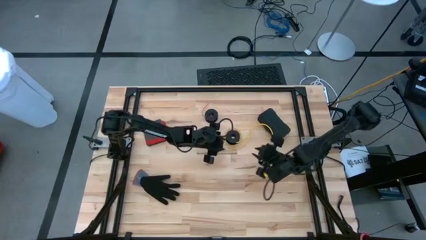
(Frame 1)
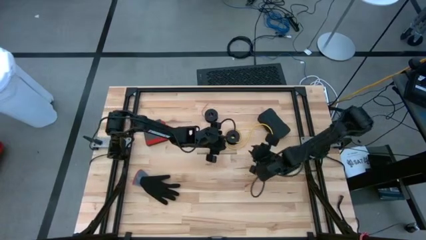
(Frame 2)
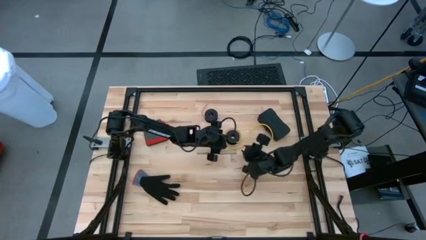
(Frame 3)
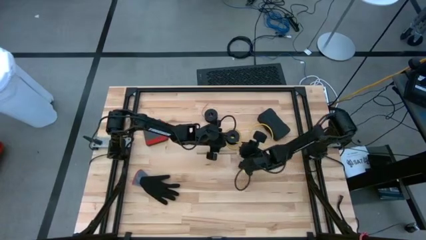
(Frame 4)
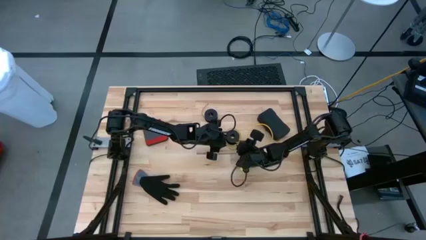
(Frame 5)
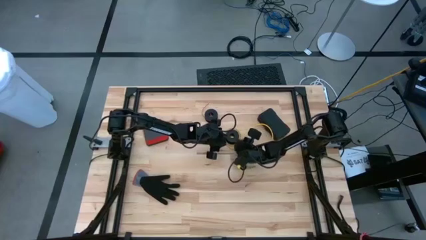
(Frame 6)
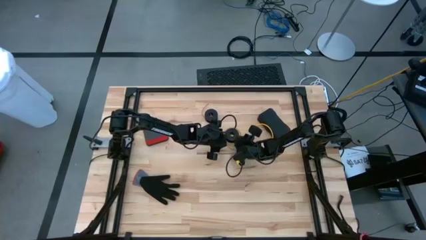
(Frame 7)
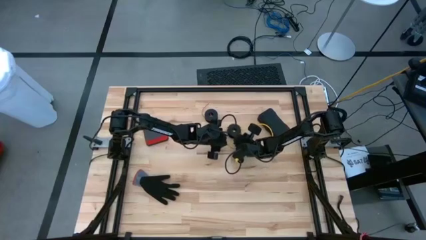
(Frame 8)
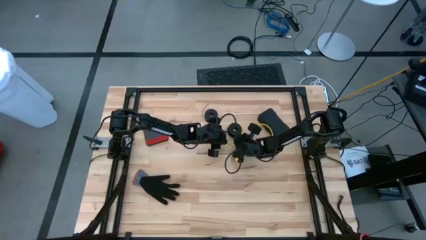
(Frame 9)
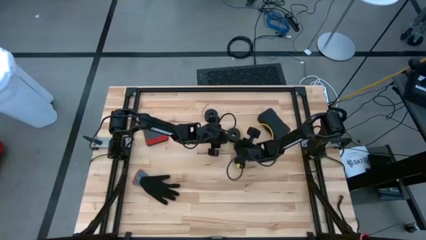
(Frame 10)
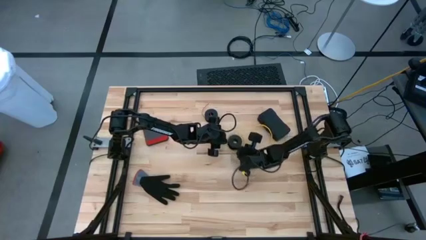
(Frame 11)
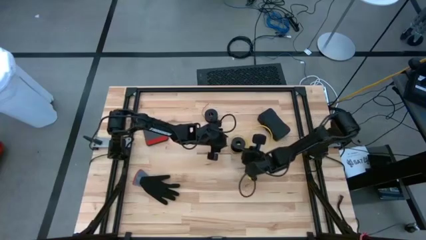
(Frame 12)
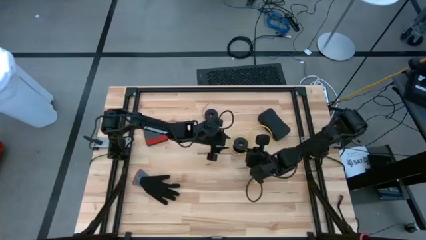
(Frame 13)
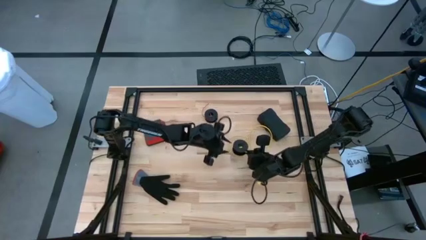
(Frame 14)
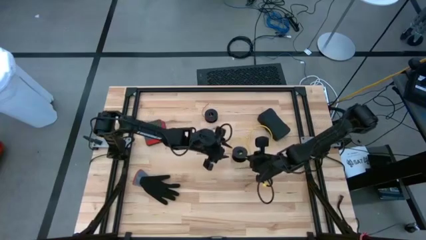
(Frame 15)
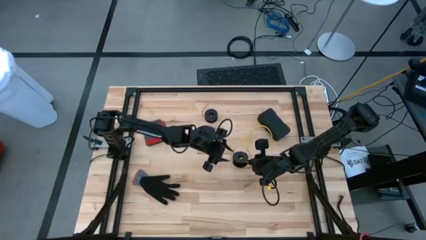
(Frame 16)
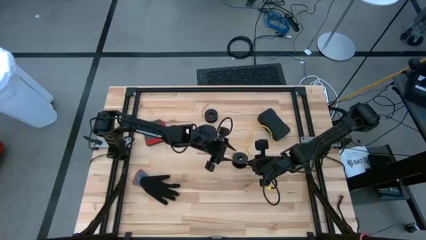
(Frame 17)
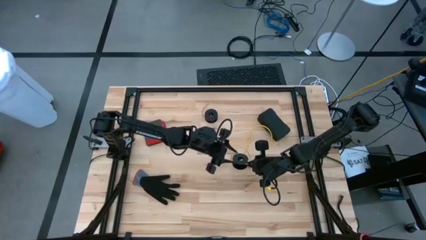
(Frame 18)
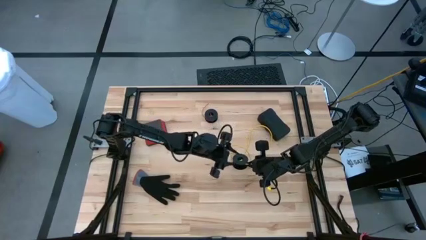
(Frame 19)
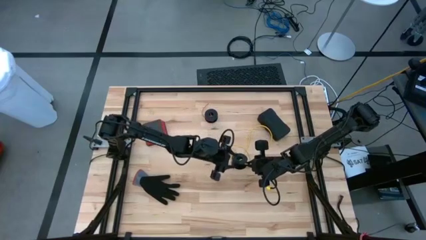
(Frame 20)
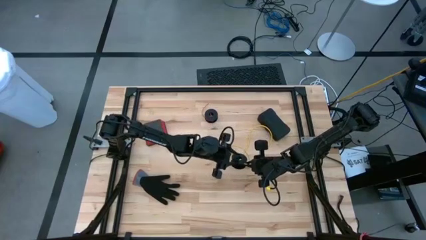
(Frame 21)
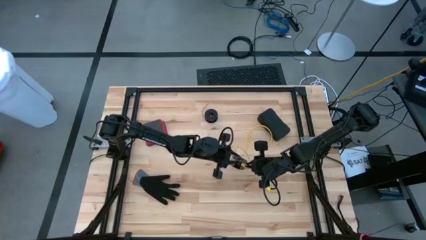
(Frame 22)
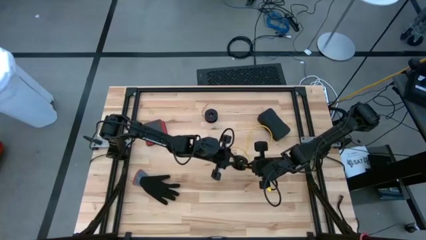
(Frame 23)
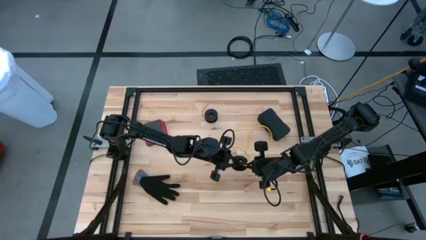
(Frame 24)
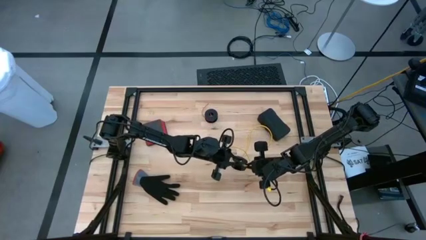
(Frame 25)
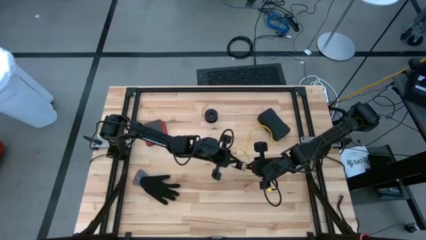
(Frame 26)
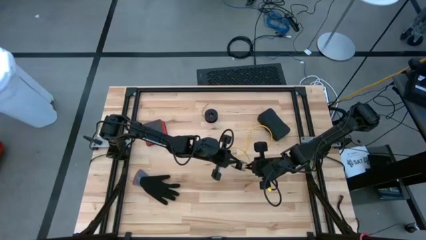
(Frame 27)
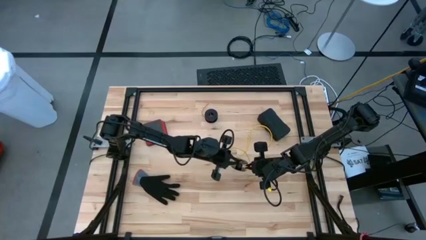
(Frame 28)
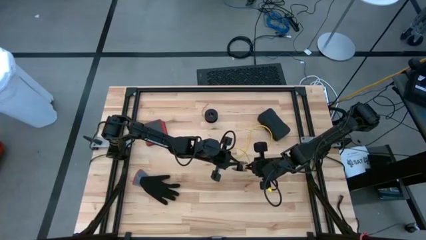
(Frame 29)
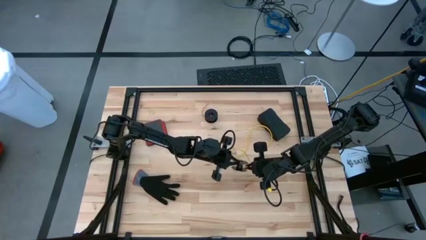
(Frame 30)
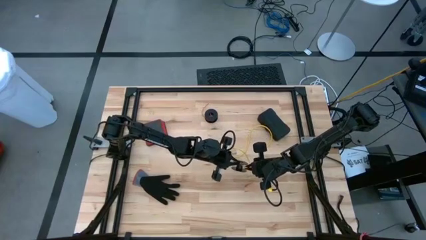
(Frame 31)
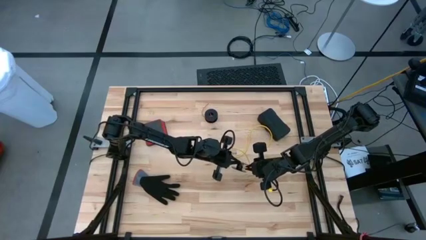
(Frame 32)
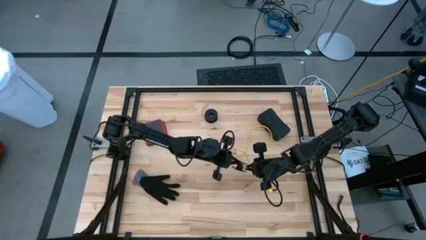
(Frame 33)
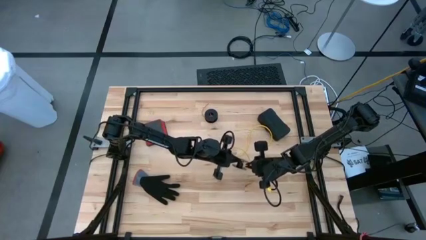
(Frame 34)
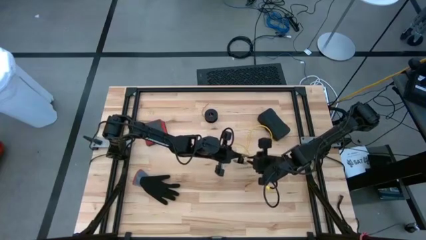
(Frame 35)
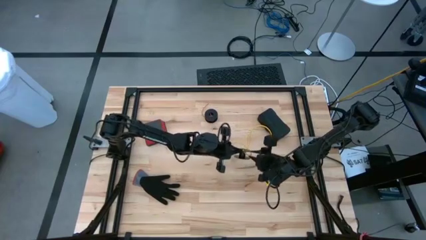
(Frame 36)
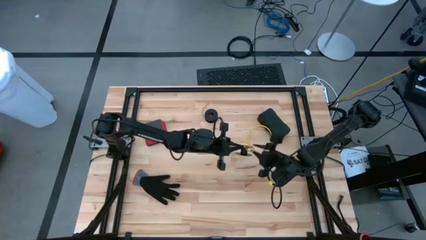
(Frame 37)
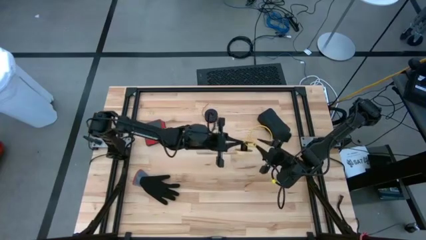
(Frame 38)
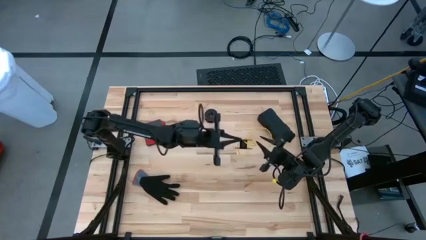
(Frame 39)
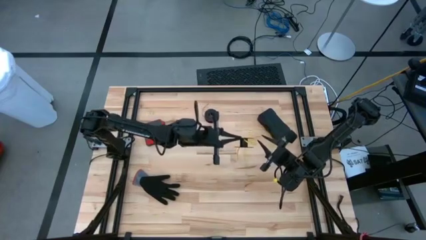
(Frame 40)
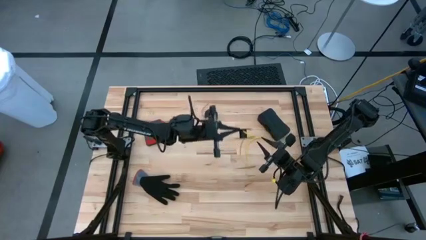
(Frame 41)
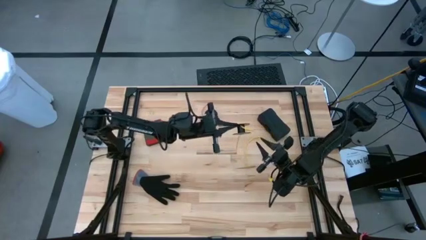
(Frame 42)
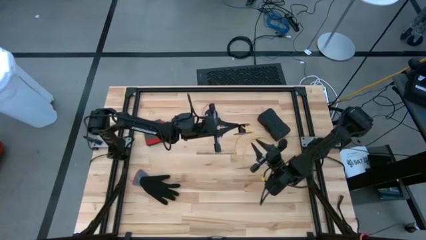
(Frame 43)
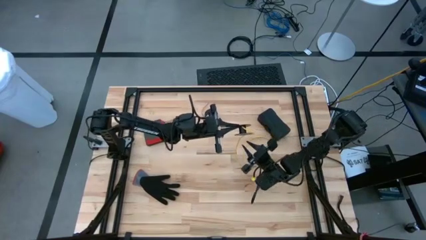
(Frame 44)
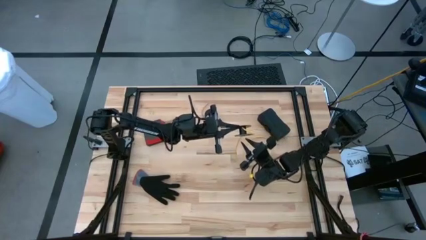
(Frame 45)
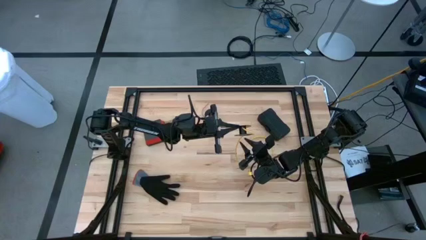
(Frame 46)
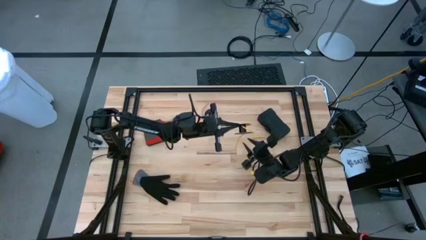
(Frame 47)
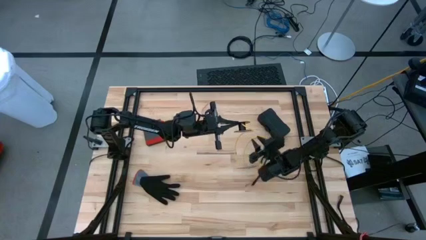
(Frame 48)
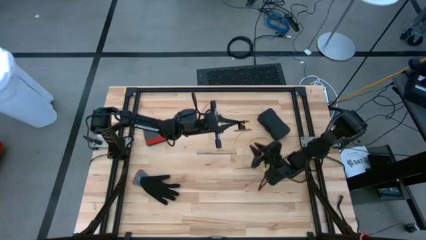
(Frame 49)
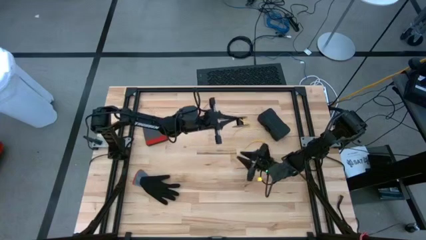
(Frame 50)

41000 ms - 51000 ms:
Task: Coil cords
Coil the yellow wire into the spool

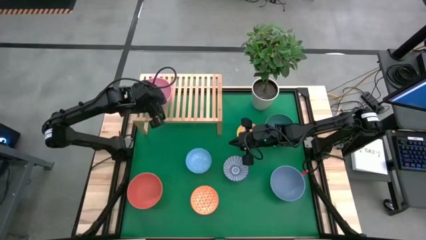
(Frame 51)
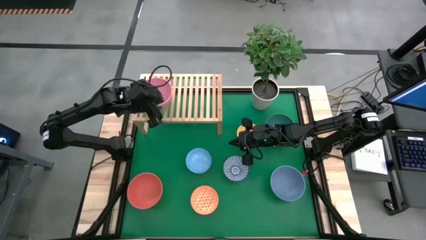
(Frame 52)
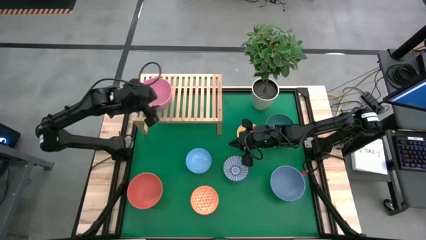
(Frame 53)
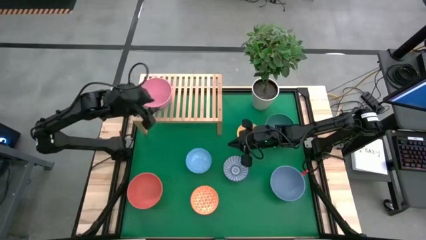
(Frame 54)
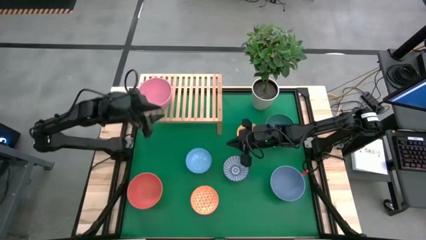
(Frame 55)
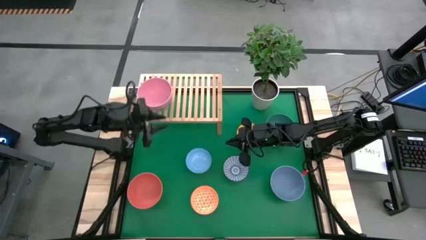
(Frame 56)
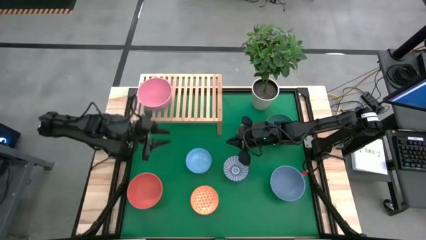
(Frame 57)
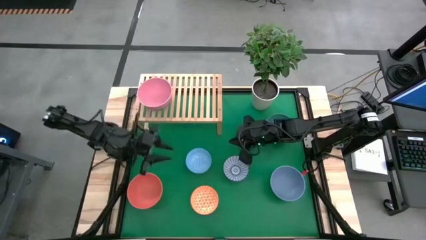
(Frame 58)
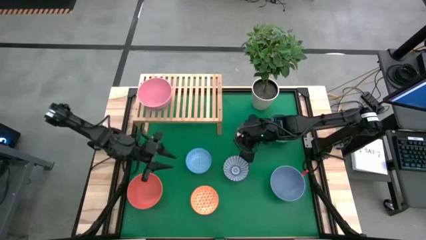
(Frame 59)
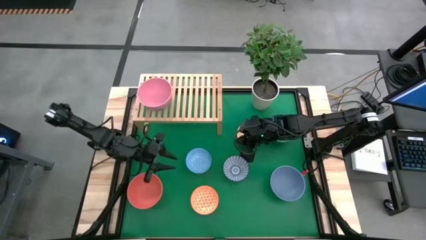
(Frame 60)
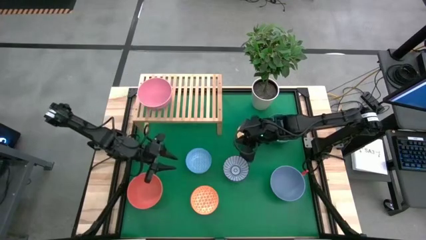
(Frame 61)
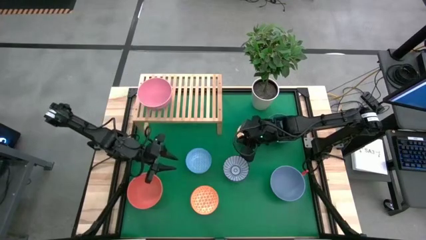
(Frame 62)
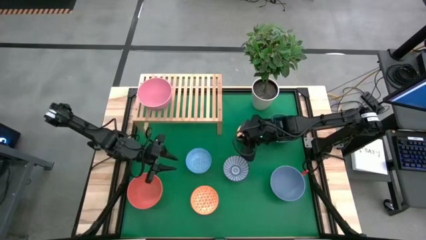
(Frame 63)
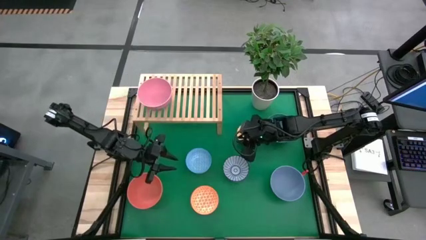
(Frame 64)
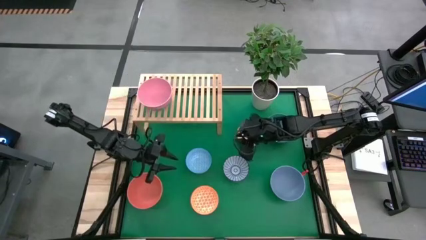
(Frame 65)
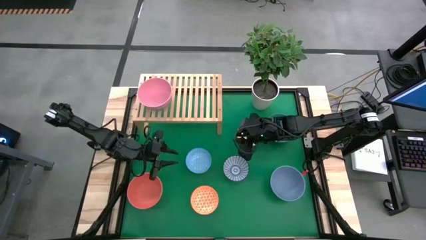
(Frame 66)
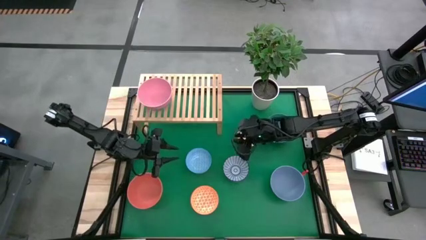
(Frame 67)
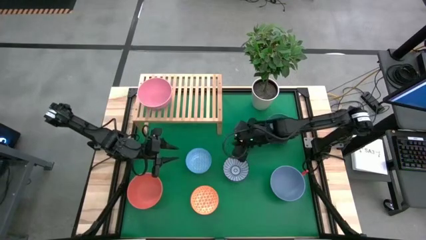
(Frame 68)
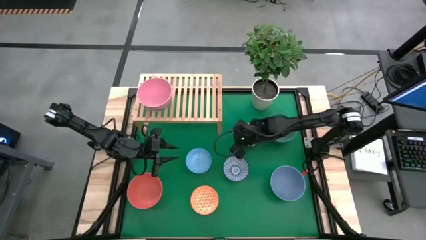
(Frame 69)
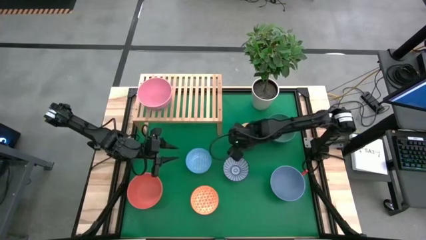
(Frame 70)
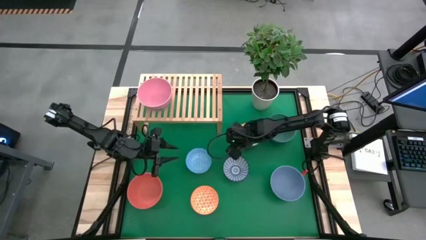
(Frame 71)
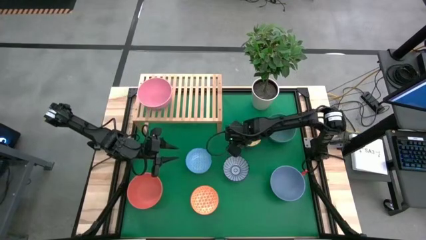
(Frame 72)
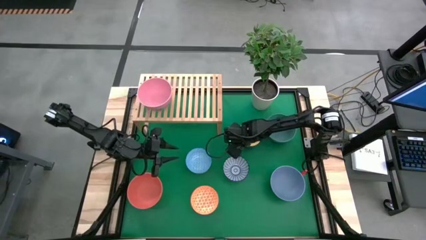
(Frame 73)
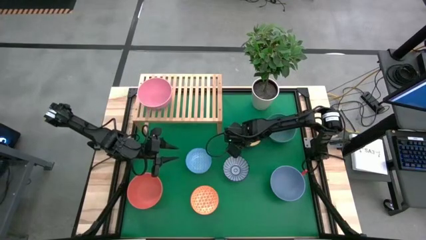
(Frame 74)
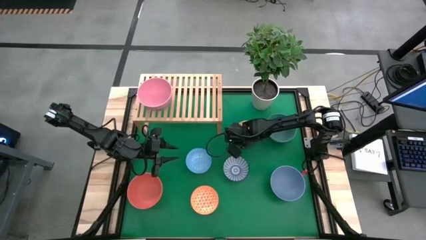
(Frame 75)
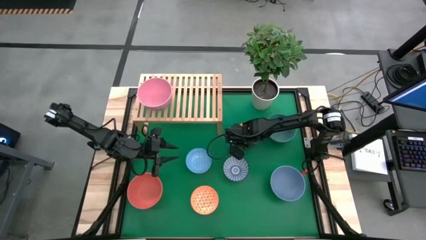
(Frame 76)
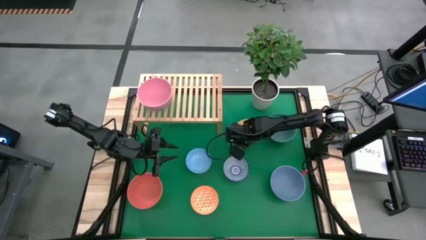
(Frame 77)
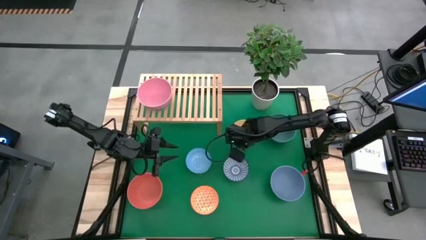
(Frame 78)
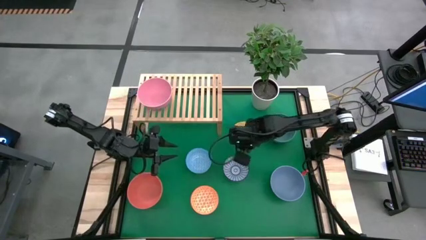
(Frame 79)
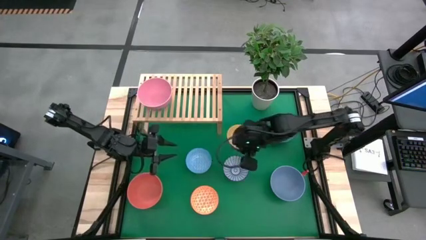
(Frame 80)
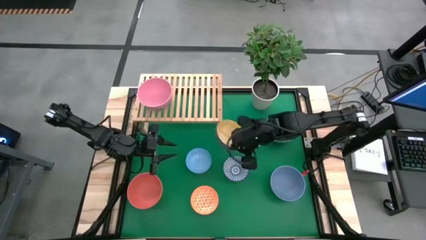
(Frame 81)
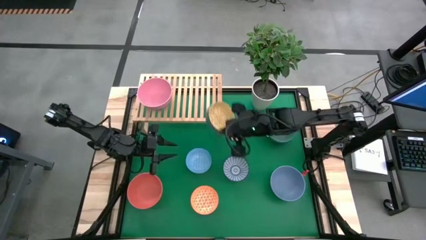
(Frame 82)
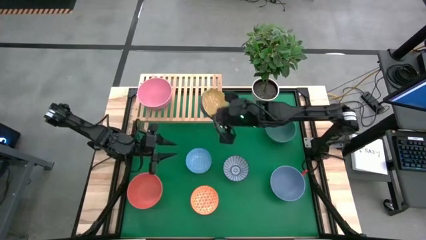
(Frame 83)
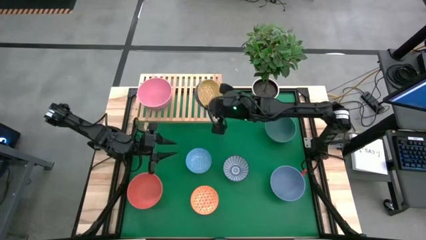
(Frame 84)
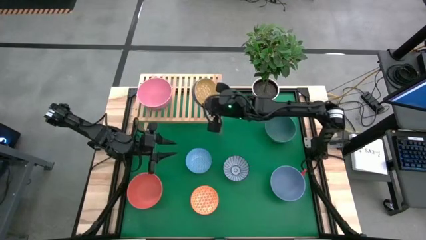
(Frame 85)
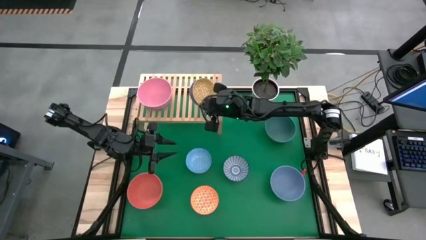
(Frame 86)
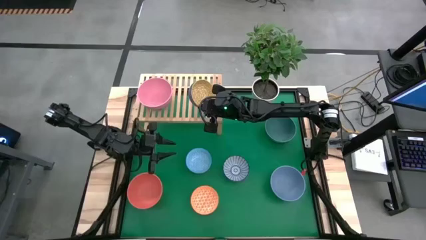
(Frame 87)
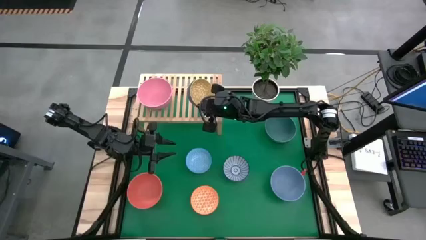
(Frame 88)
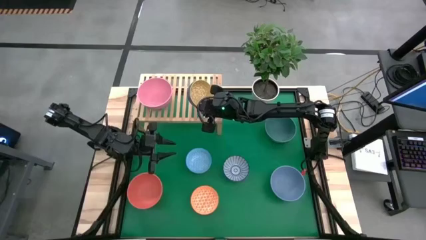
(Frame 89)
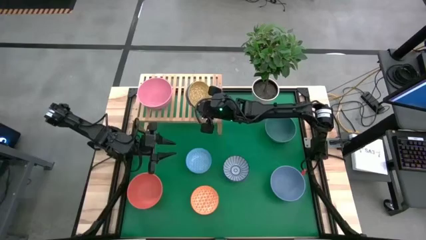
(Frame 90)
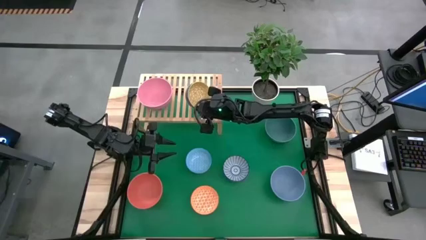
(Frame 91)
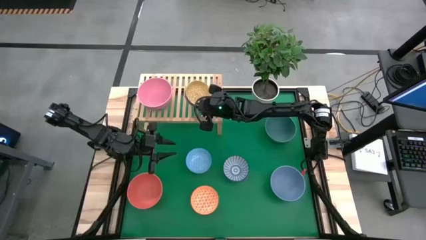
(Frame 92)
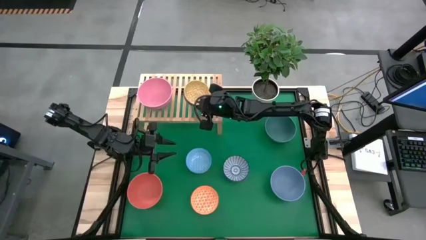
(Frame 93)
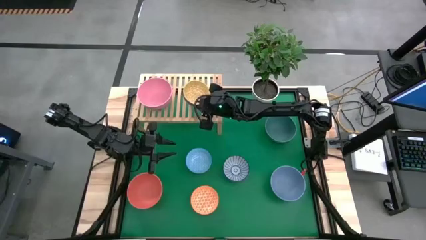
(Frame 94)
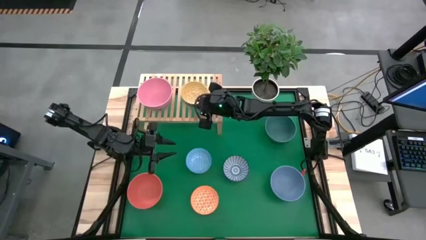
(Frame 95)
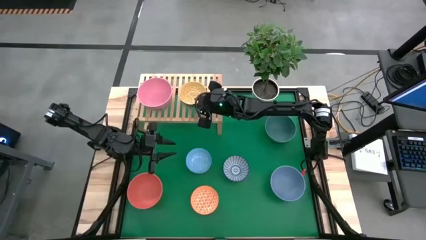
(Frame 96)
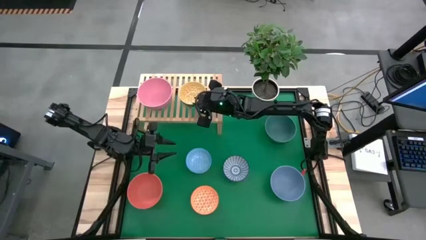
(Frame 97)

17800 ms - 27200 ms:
Task: Place and stack bowls onto a shelf
Put the yellow patterned bowl on the shelf
